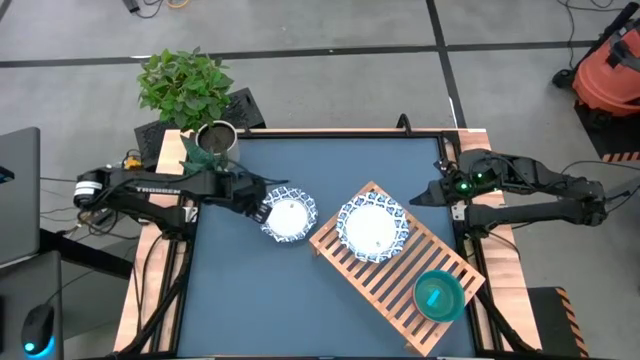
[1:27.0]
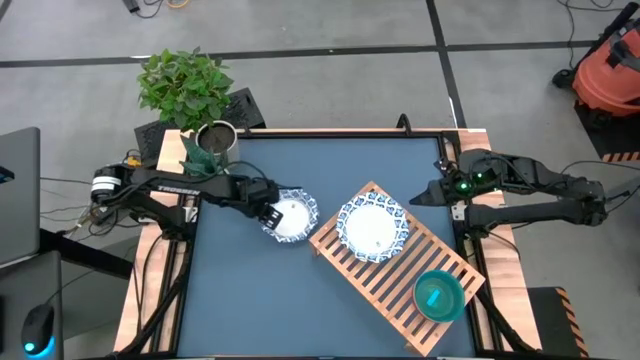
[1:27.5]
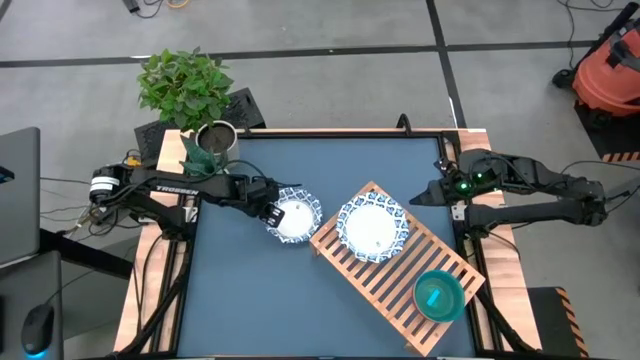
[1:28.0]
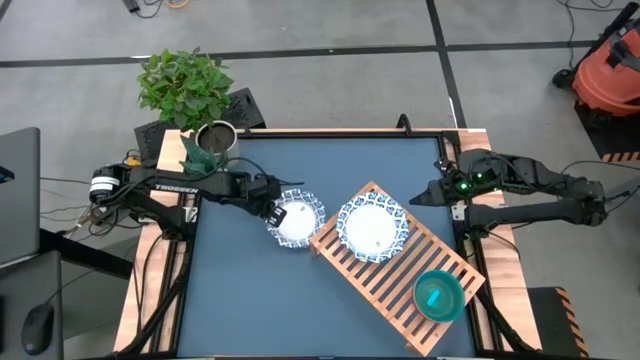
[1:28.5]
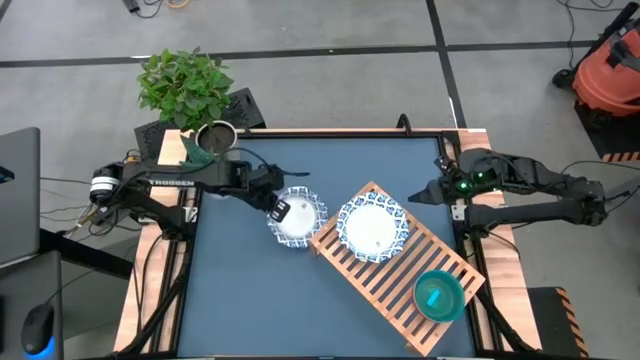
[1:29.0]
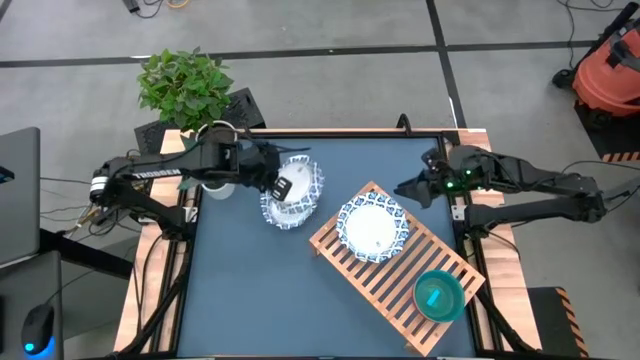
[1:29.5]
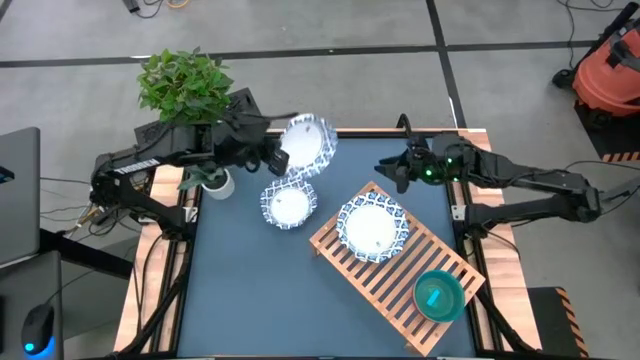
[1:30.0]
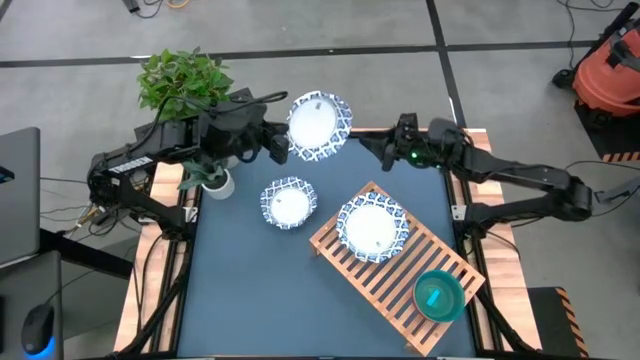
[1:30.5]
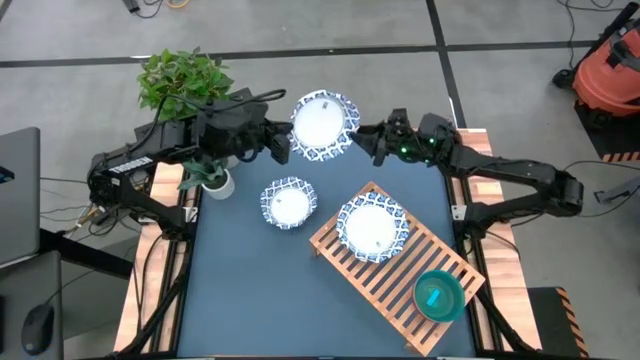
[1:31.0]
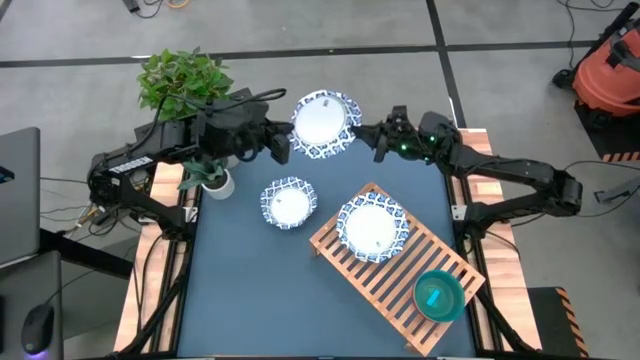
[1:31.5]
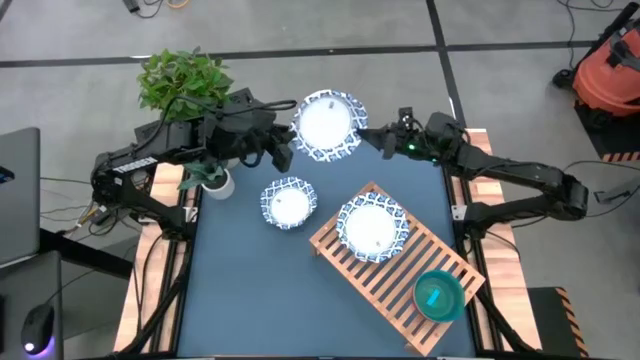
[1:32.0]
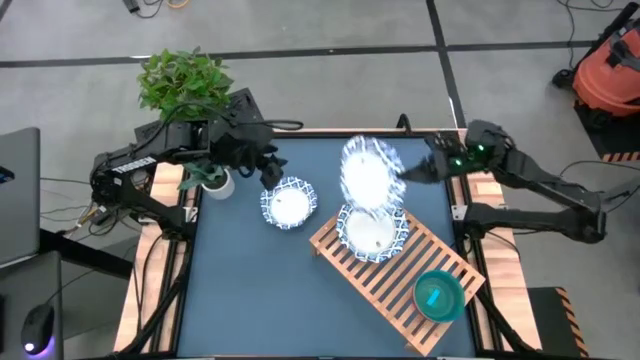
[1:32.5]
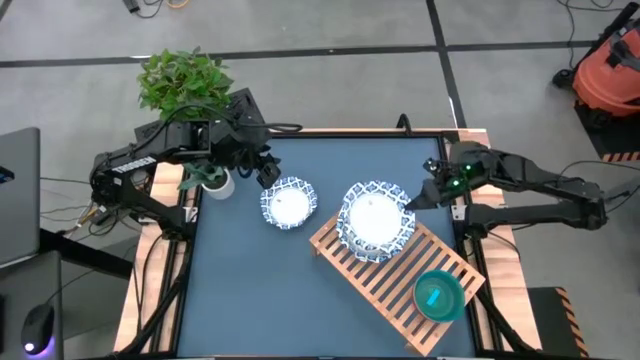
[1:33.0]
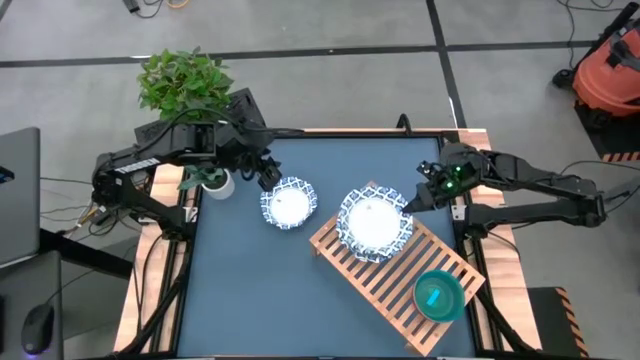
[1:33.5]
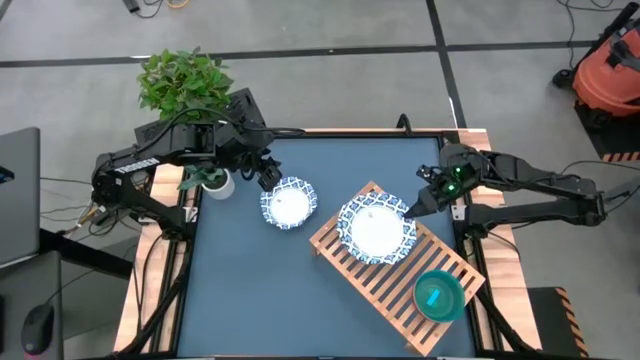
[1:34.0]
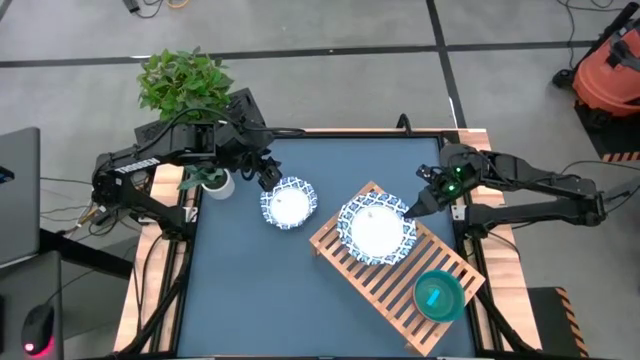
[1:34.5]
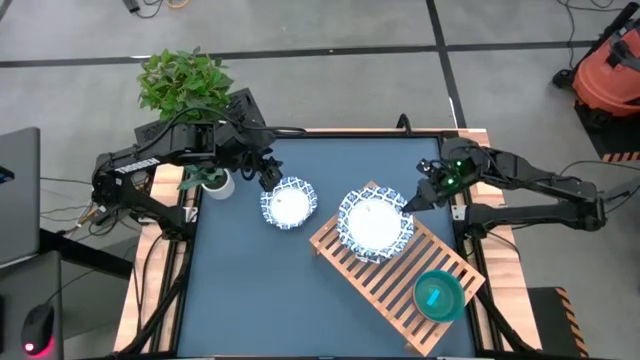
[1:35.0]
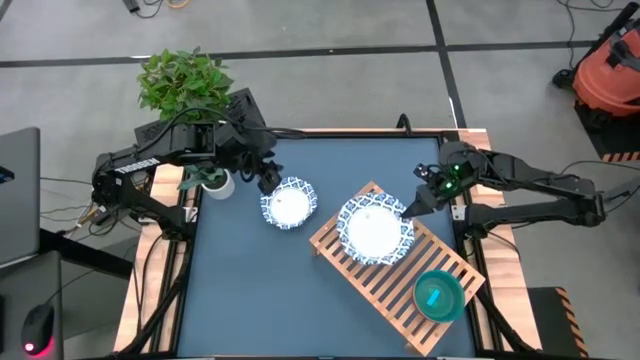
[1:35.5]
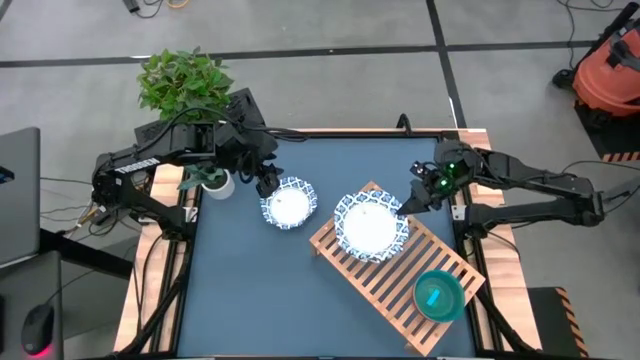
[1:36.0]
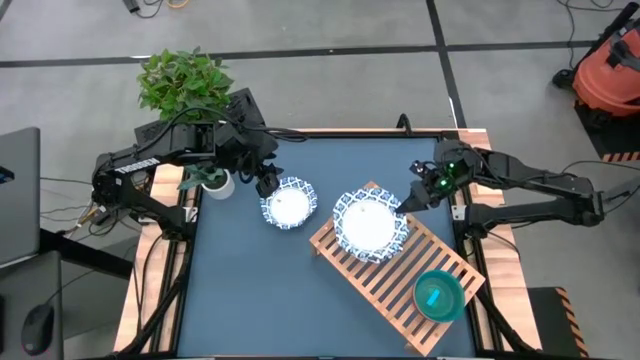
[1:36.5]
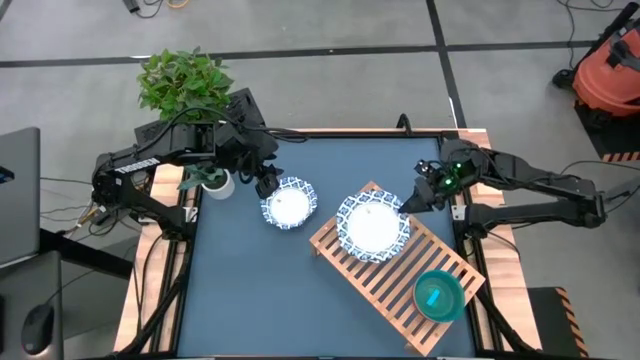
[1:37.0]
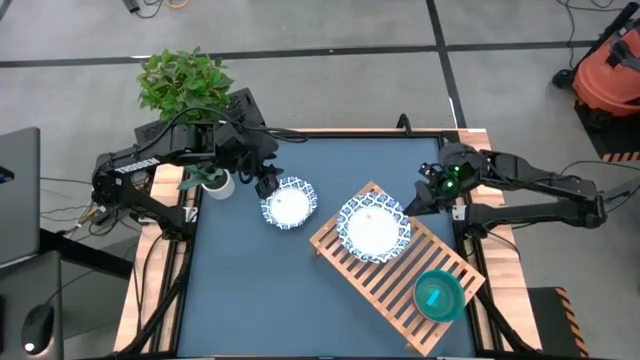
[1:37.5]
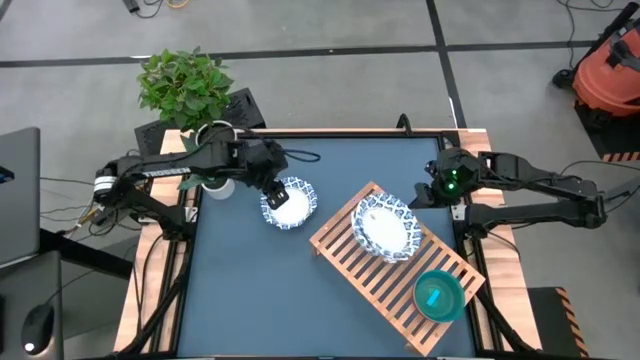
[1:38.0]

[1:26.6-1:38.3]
Task: Place and stack bowls onto a shelf
Stack the large white bowl on top of the large white bowl on the shelf

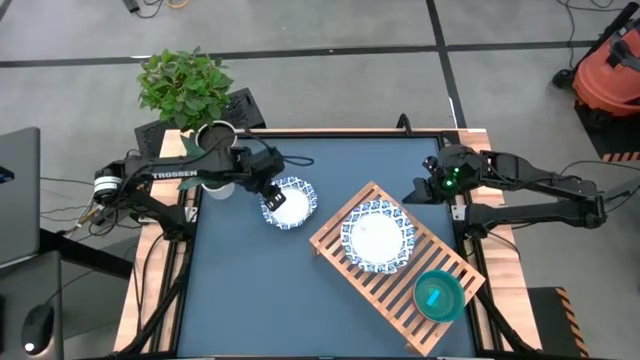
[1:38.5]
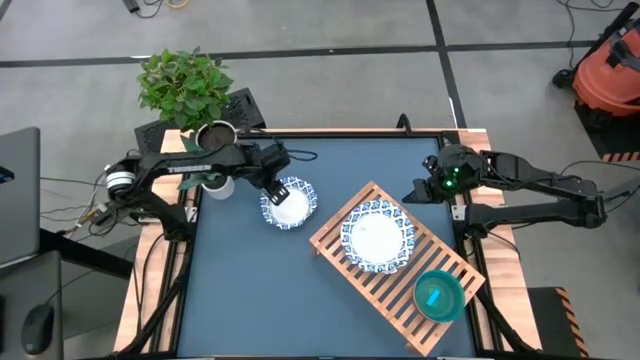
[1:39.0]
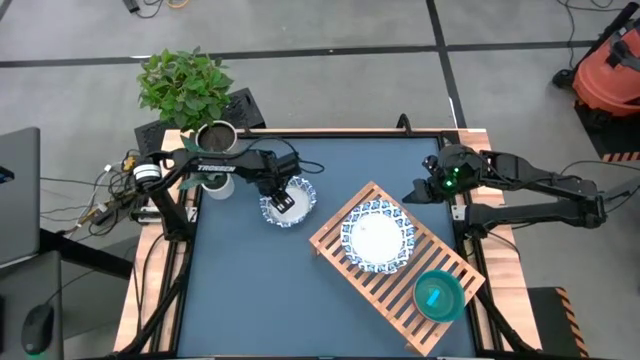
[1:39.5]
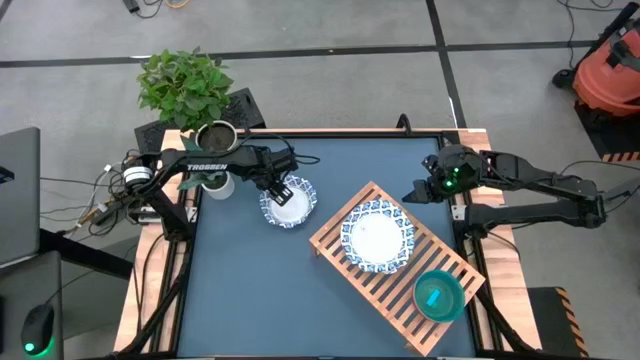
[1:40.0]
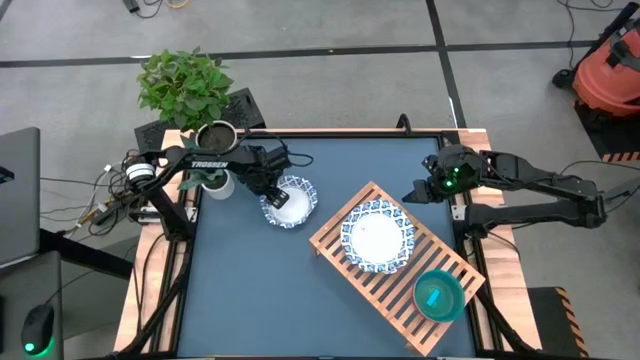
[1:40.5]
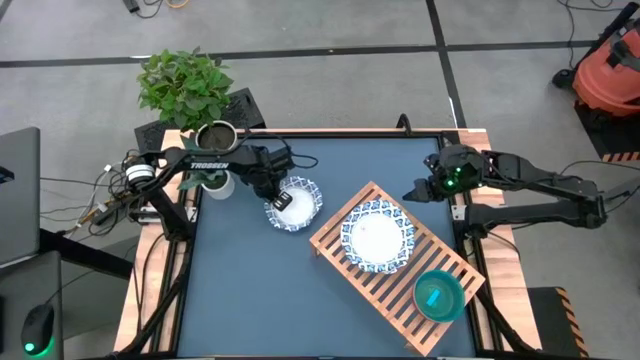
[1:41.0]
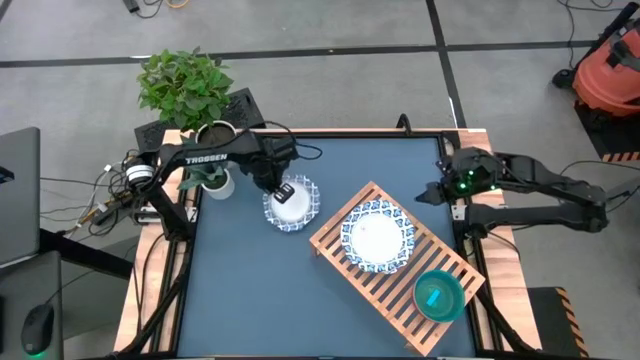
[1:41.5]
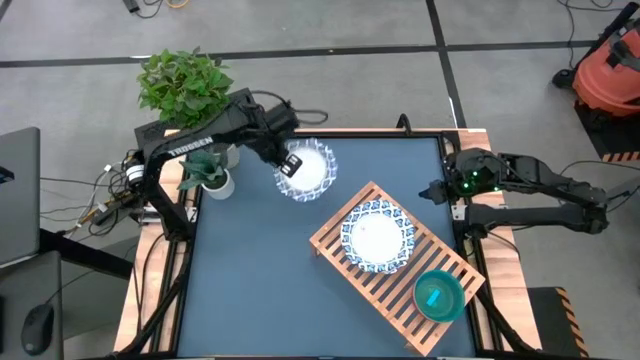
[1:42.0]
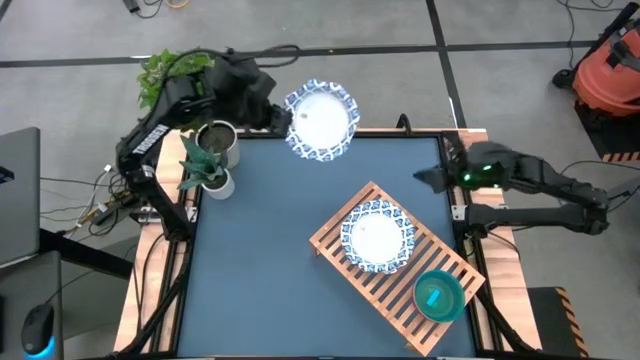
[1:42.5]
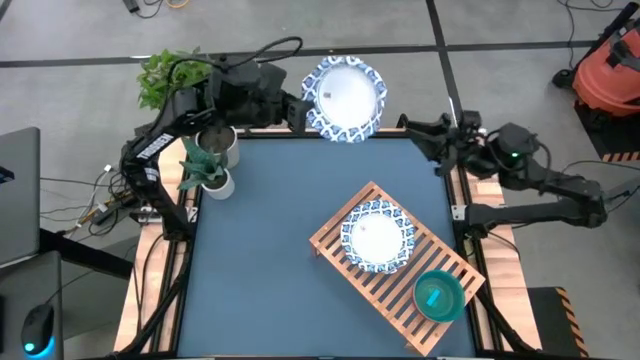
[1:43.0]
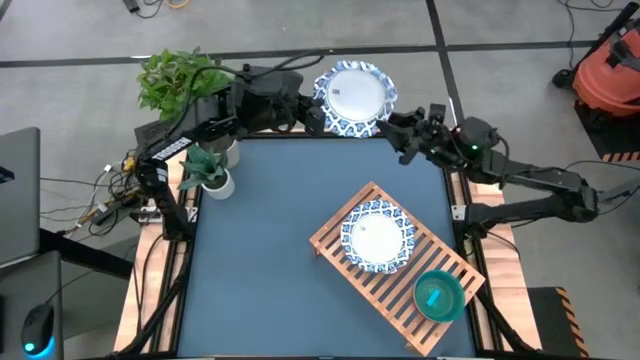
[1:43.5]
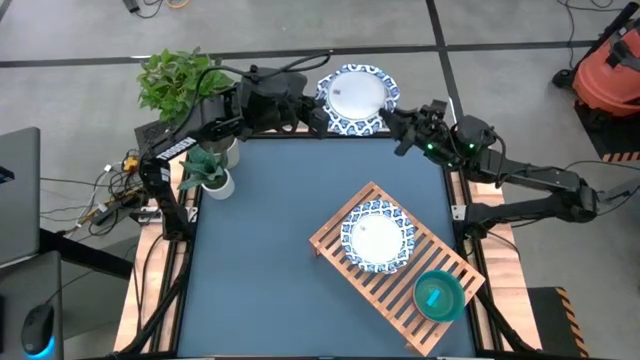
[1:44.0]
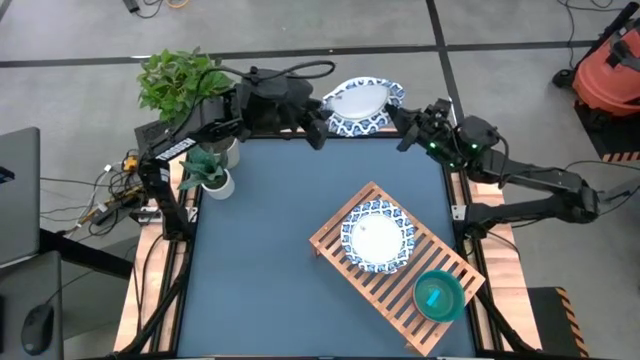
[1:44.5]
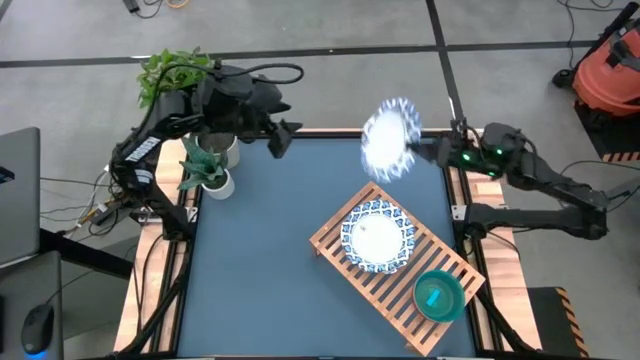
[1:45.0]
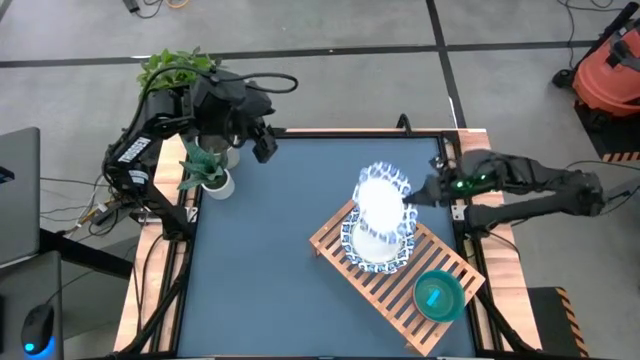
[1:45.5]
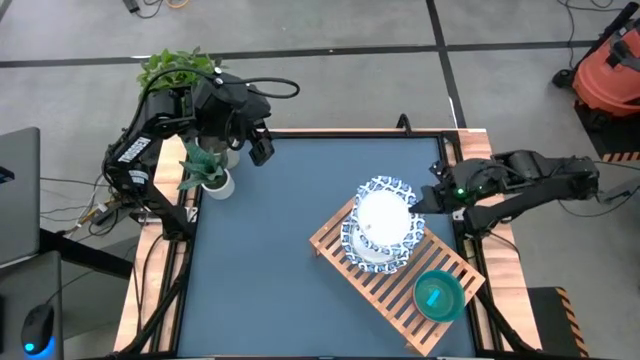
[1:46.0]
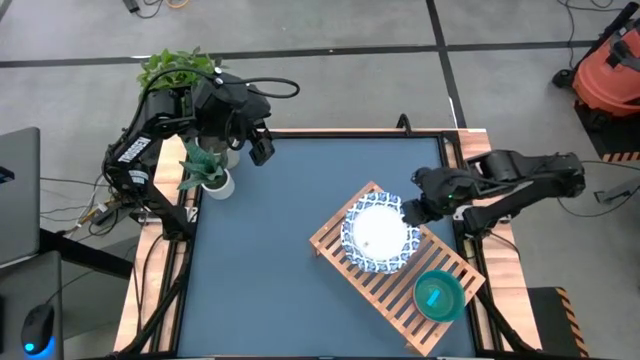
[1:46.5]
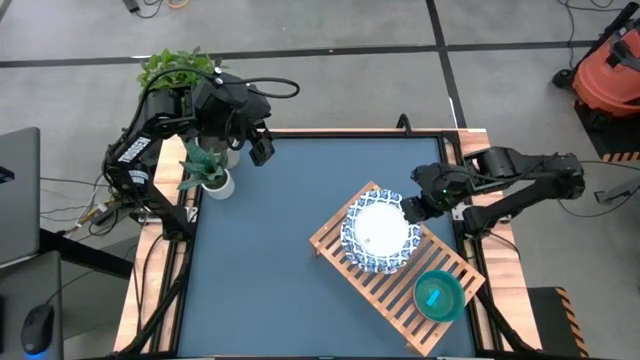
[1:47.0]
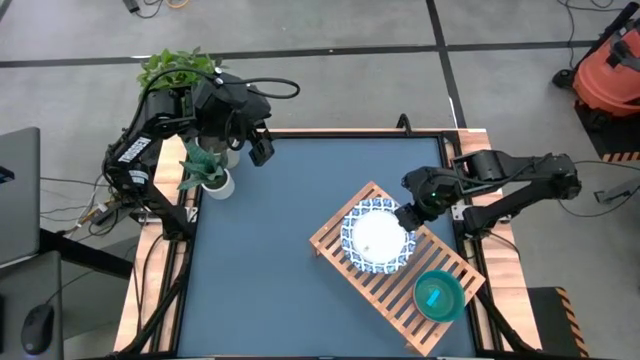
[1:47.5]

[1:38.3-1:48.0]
Stack the large white bowl on top of the large white bowl on the shelf

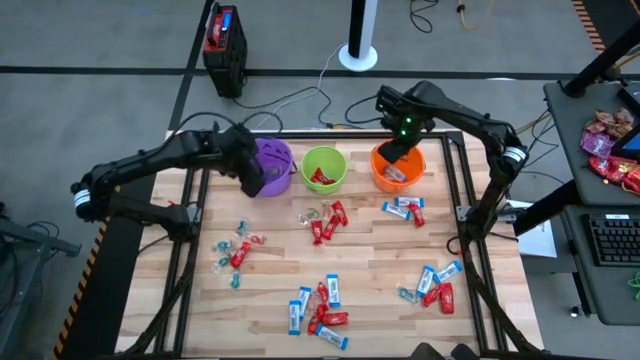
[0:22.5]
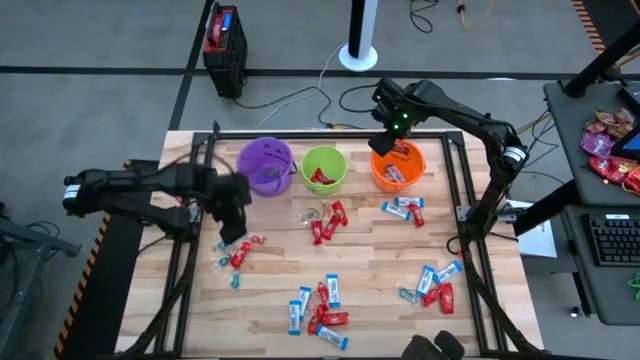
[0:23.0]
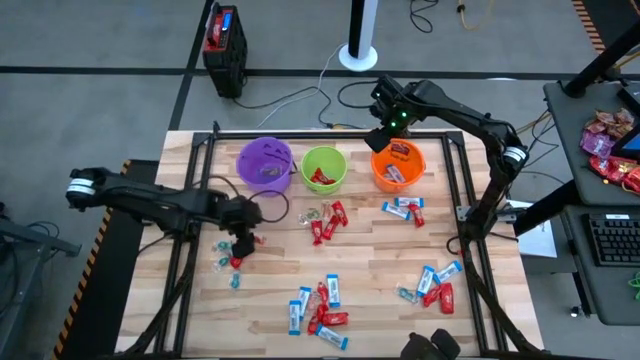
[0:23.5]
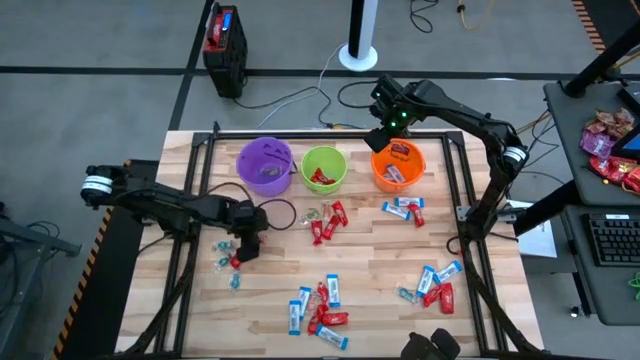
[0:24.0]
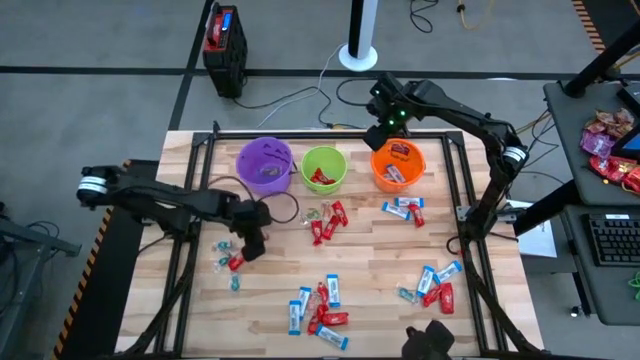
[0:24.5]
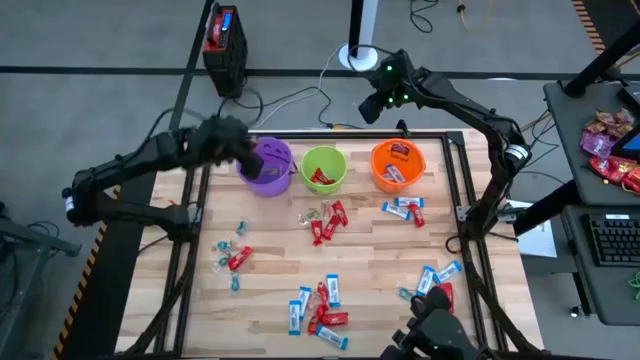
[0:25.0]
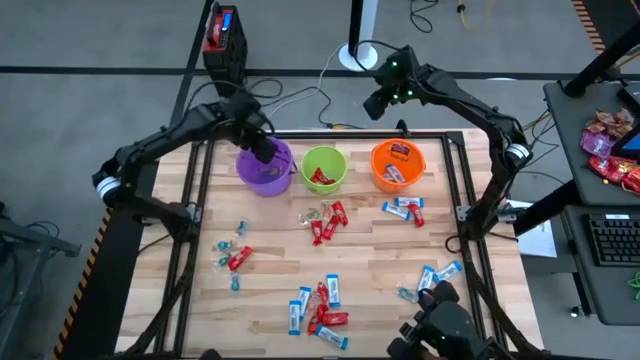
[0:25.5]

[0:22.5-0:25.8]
Task: Sort candy by brand, put in halloween buckets
Put the red gummy candy into the purple bucket
